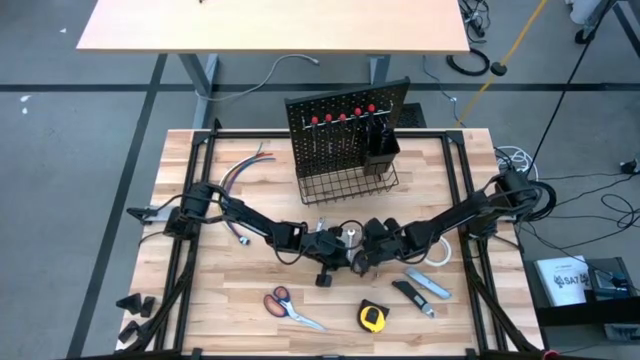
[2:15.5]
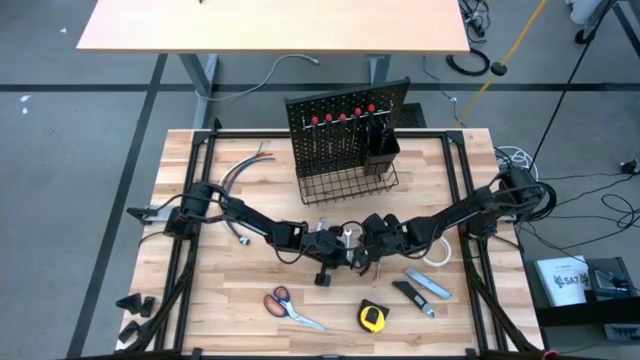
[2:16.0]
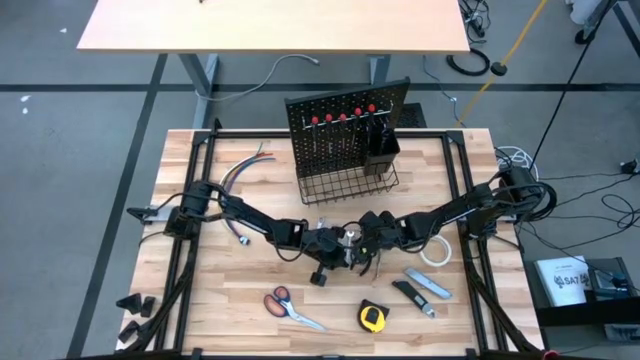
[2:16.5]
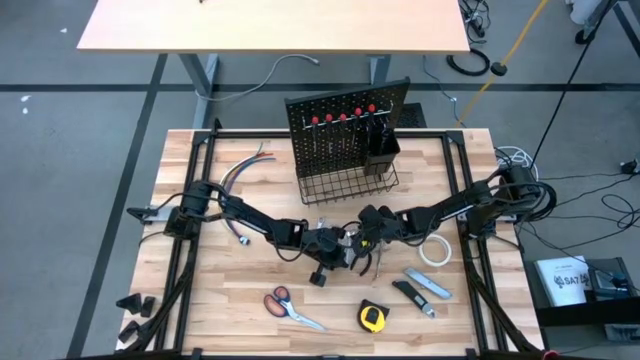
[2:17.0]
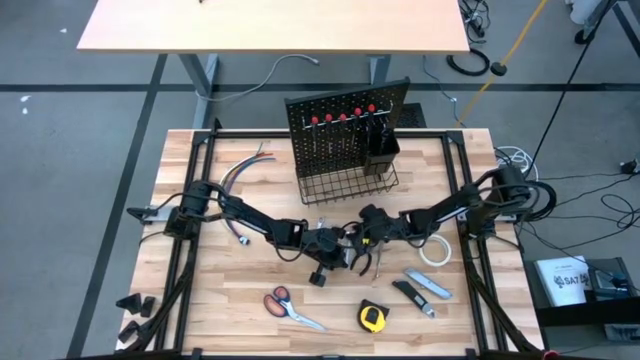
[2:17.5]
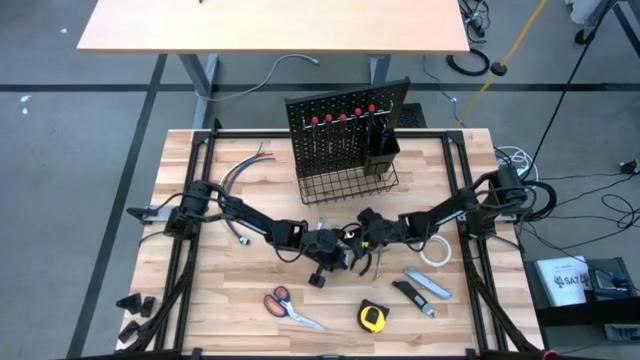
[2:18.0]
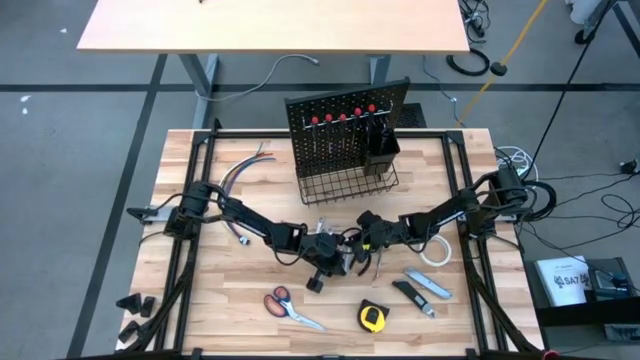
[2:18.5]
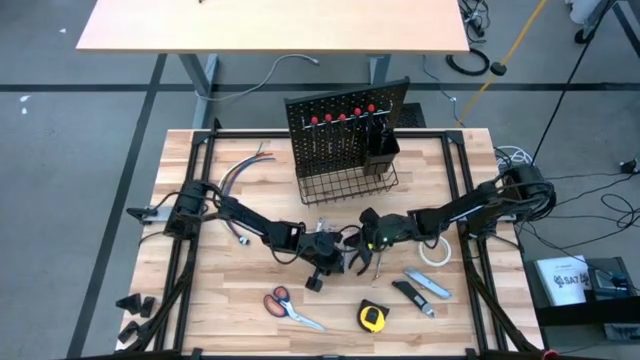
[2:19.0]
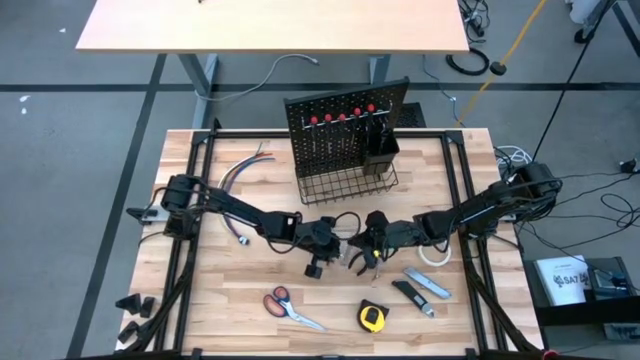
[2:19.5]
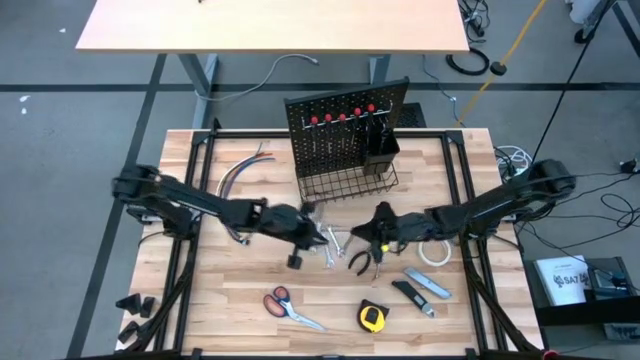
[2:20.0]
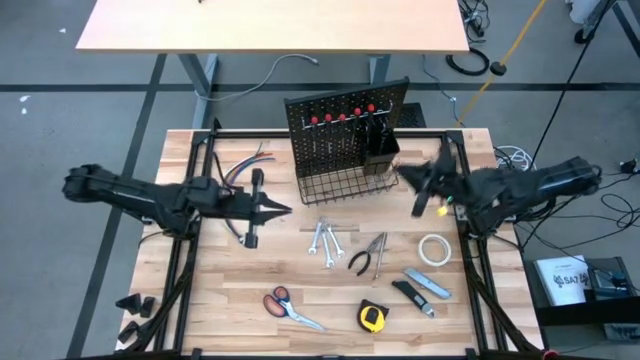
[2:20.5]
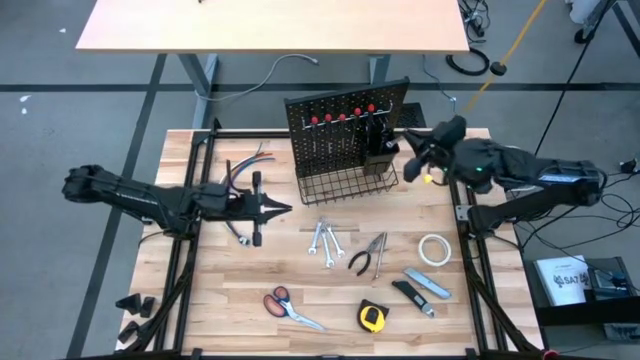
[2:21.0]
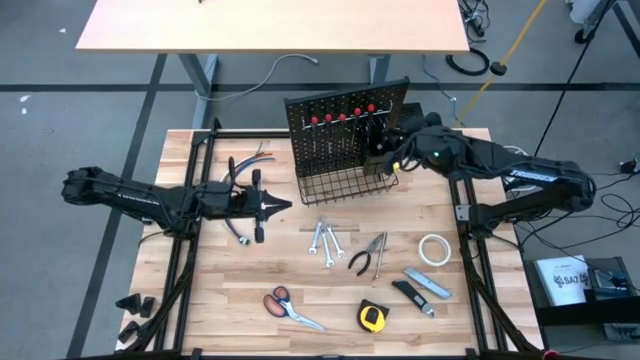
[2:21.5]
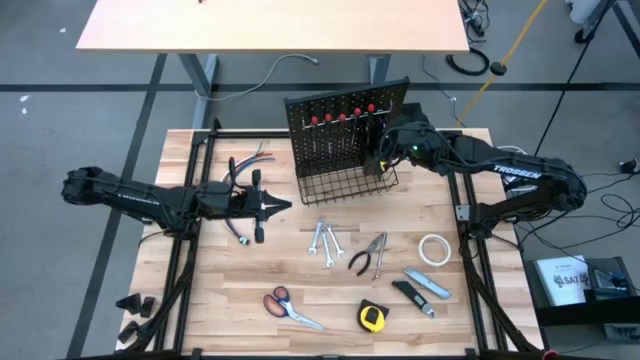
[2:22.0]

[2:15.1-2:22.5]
Task: Hang tools onto peg board
Put the wrench into the black bin on the pegboard

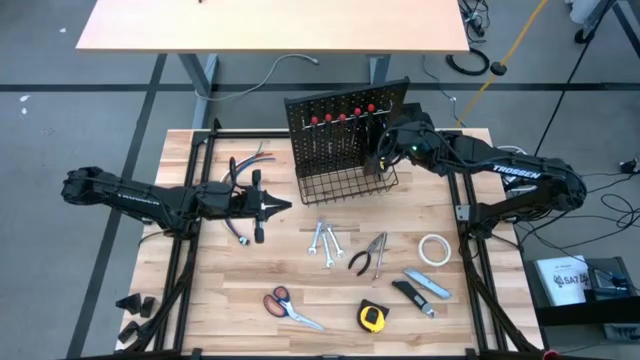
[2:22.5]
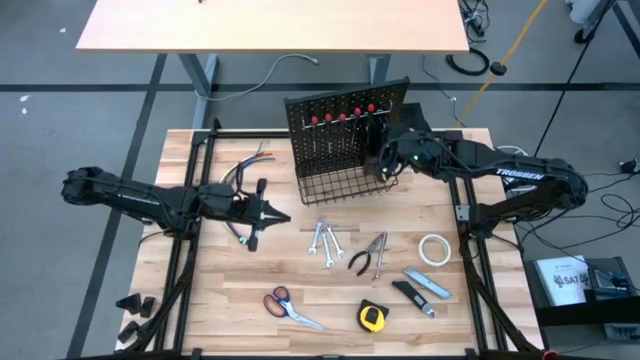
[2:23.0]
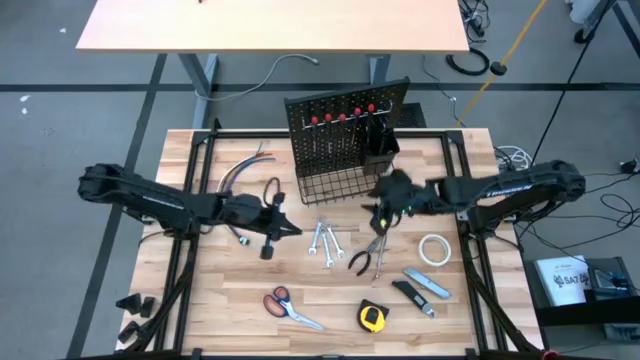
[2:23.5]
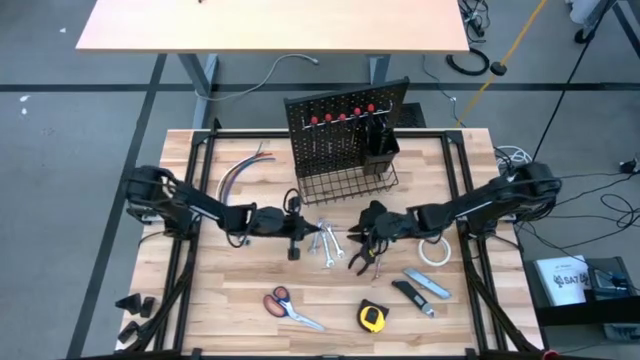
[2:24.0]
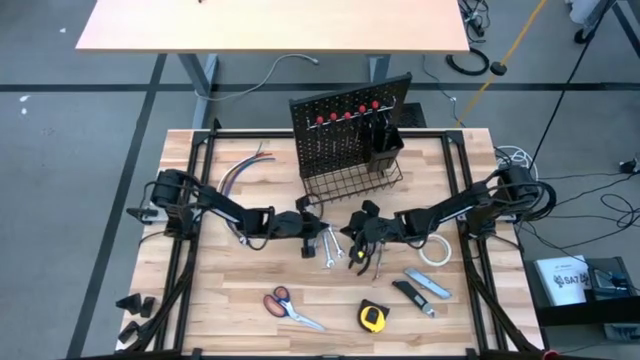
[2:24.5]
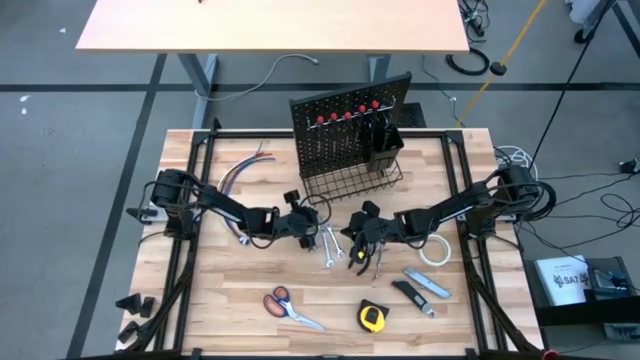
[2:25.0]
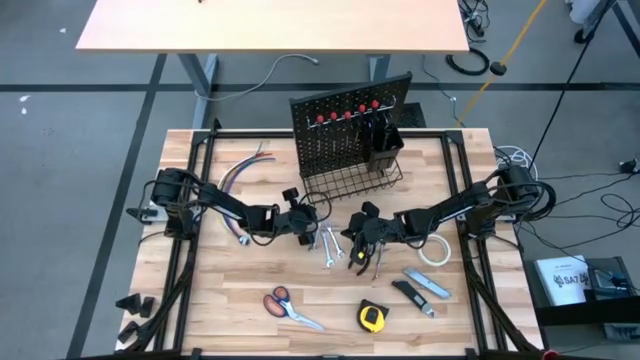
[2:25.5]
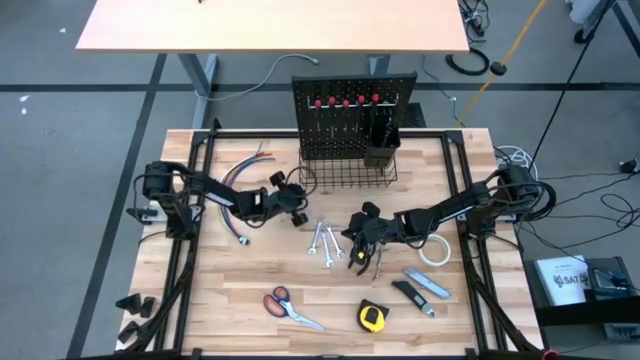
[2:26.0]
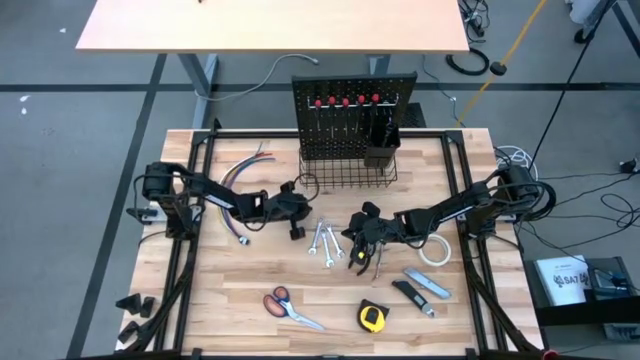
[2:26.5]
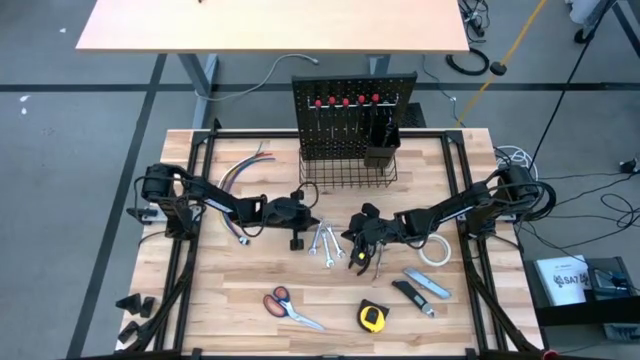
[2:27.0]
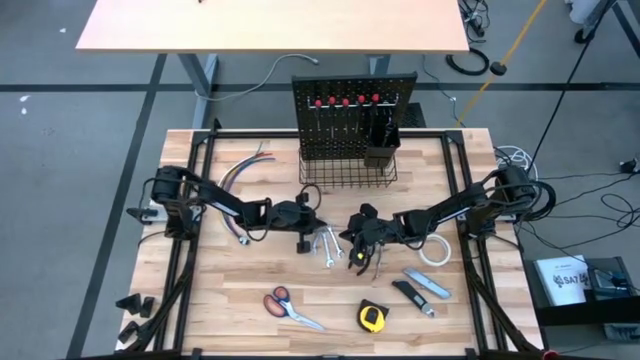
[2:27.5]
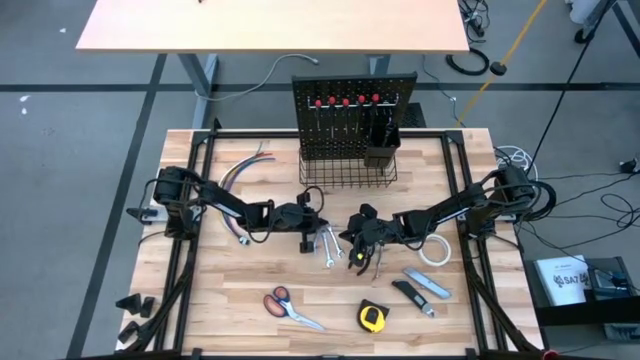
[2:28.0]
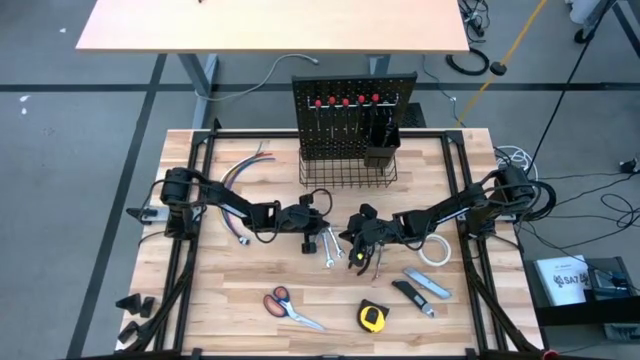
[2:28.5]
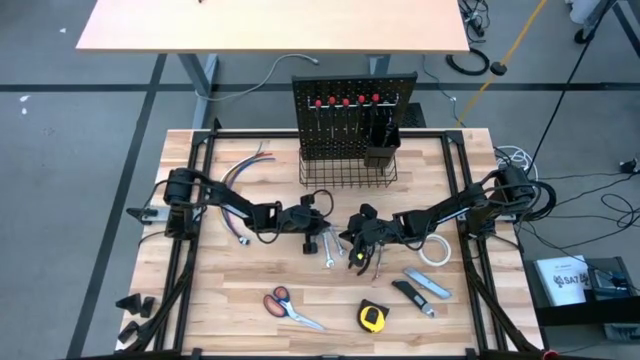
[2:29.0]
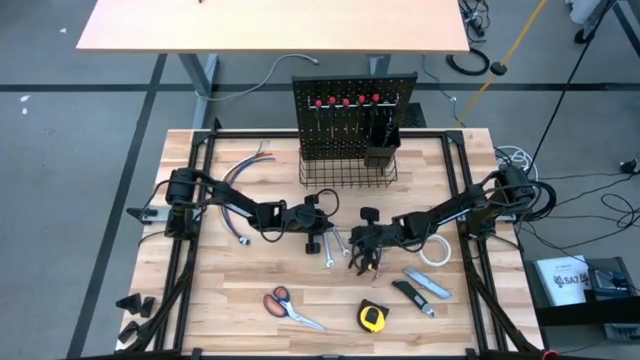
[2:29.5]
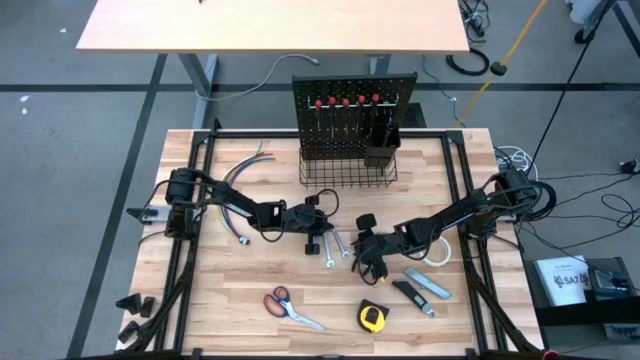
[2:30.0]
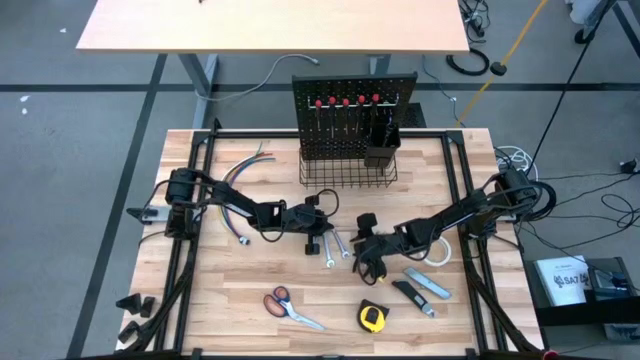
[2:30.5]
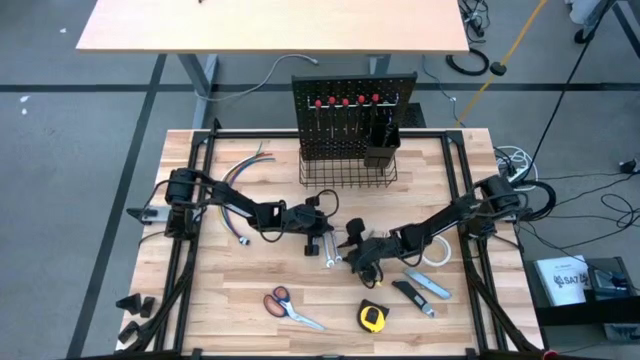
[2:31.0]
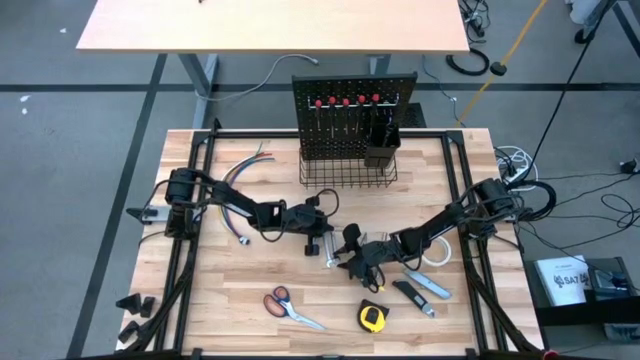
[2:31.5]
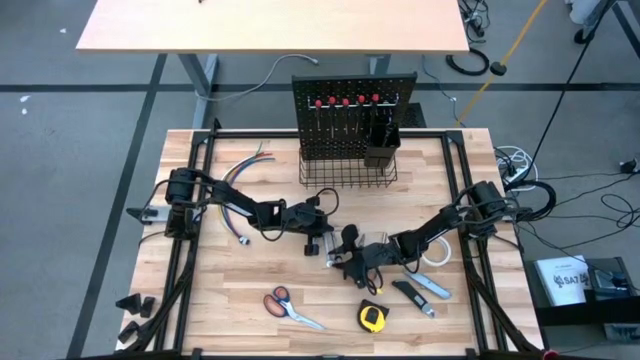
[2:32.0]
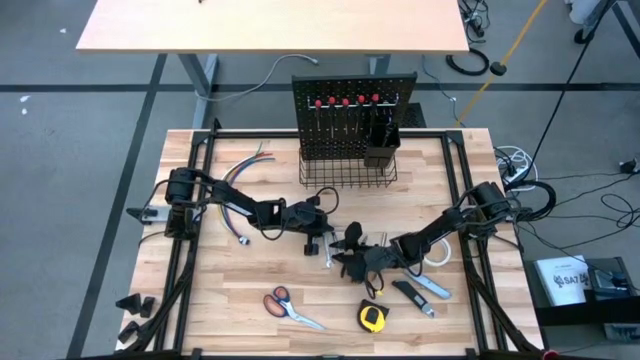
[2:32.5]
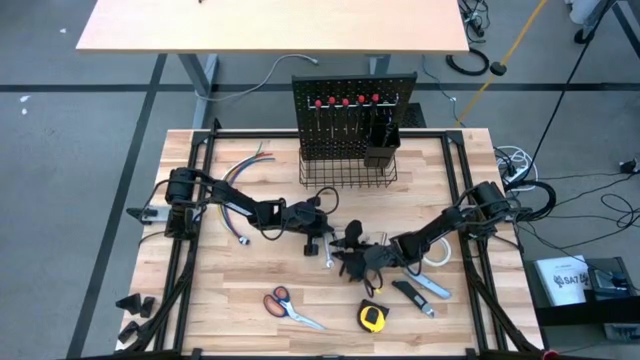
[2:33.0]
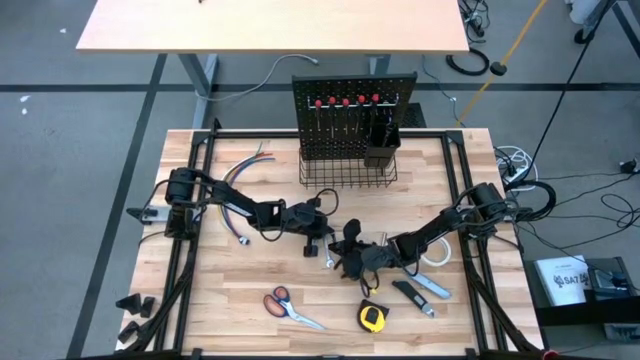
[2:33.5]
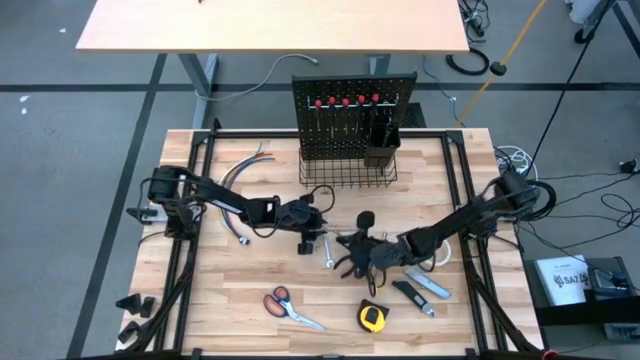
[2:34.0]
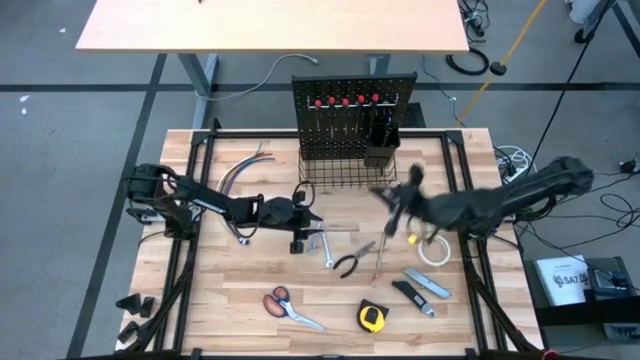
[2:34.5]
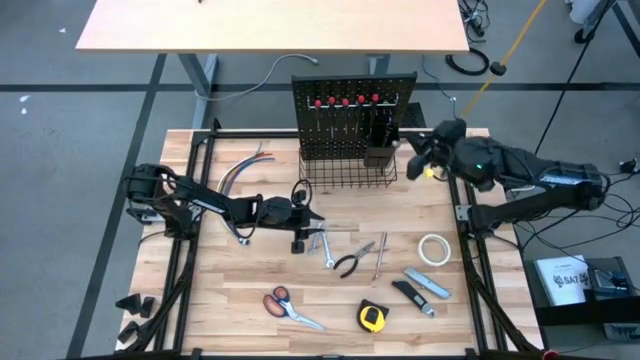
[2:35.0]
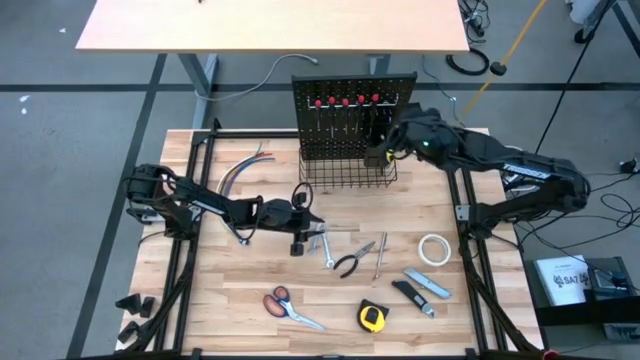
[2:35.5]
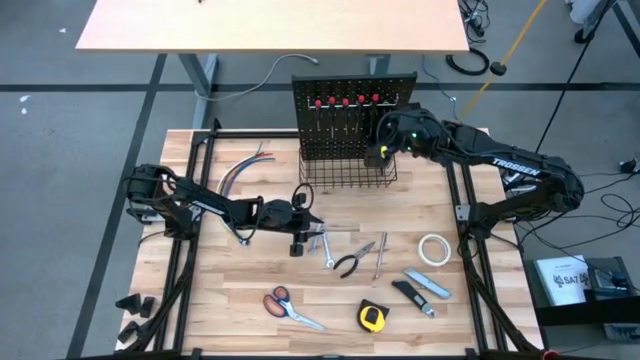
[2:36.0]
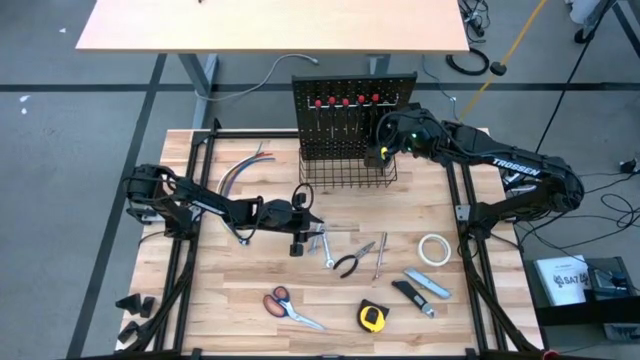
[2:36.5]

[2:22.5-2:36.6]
Put the wrench into the black bin on the pegboard
